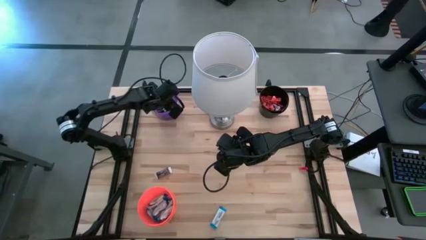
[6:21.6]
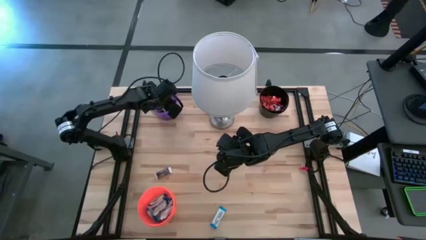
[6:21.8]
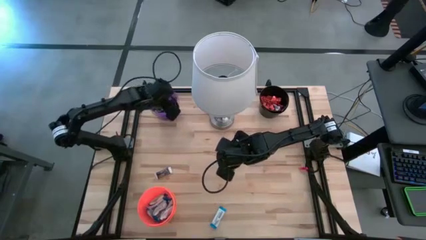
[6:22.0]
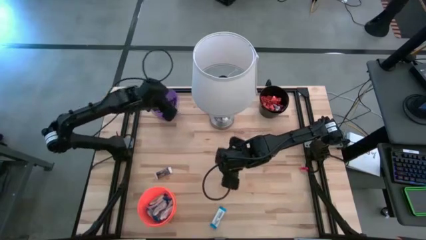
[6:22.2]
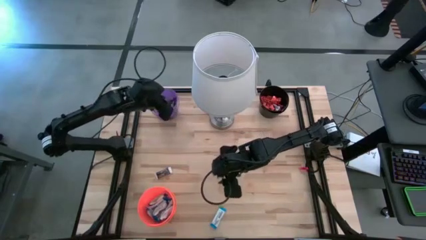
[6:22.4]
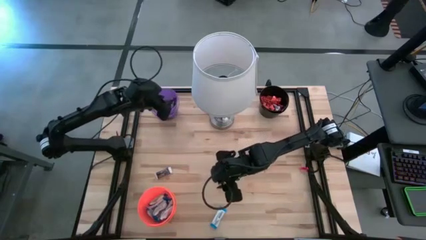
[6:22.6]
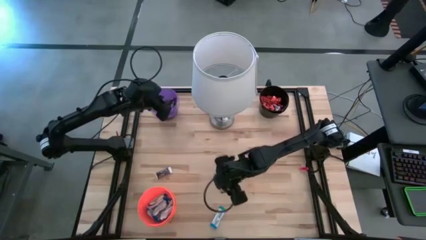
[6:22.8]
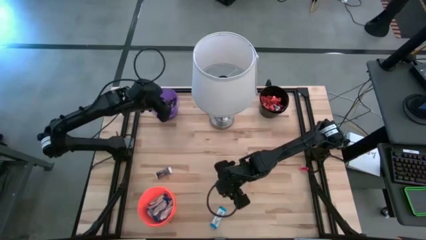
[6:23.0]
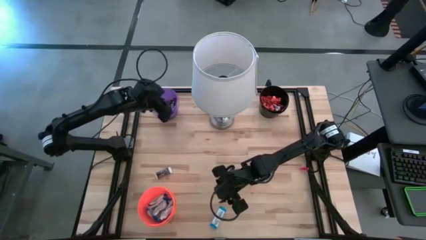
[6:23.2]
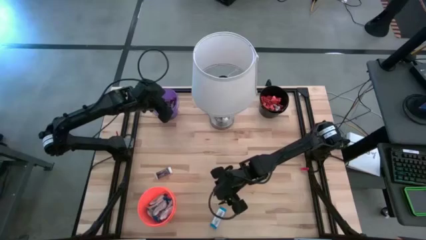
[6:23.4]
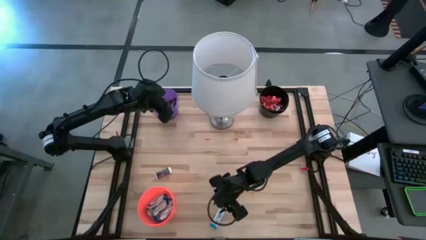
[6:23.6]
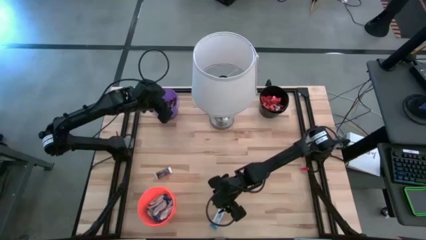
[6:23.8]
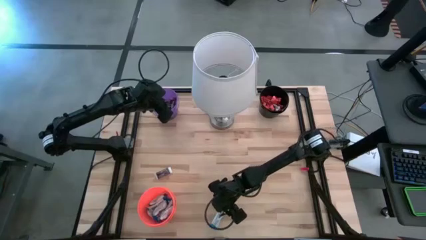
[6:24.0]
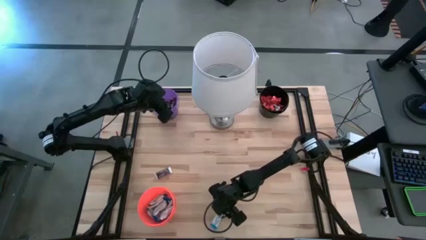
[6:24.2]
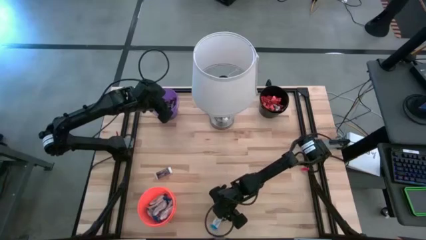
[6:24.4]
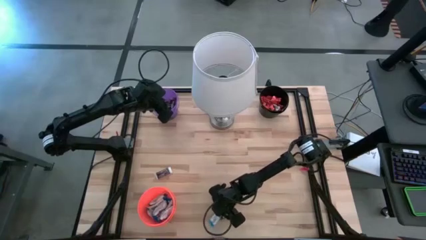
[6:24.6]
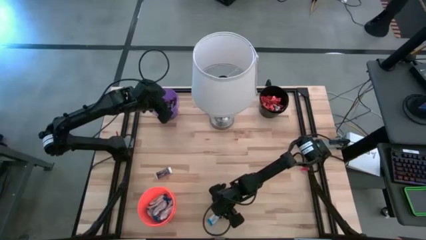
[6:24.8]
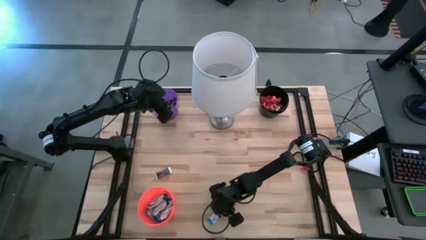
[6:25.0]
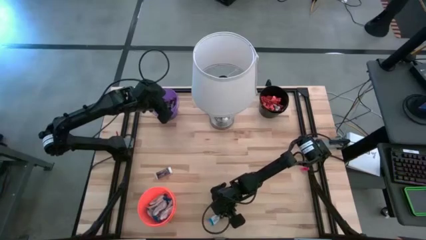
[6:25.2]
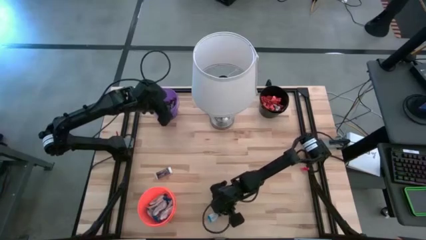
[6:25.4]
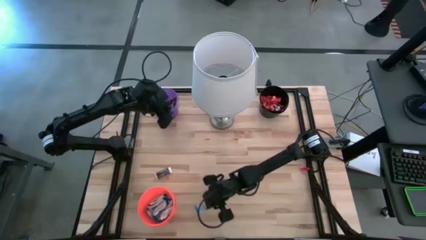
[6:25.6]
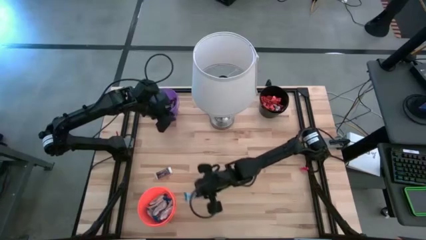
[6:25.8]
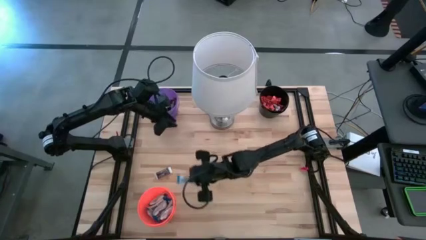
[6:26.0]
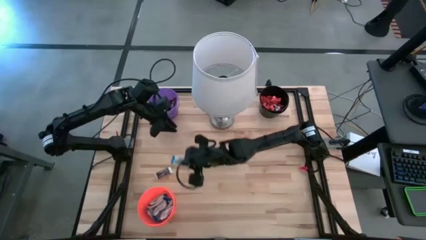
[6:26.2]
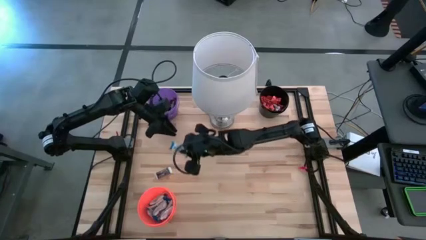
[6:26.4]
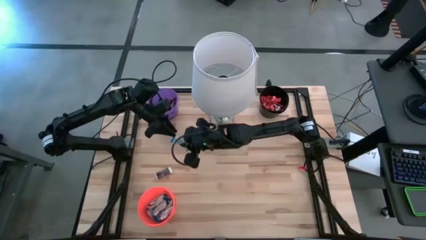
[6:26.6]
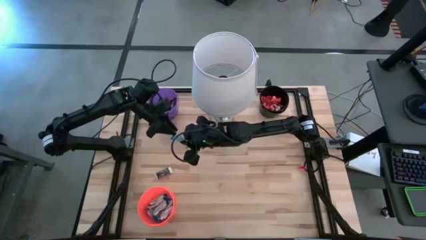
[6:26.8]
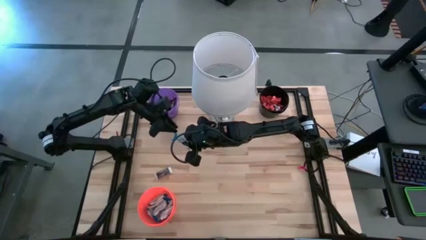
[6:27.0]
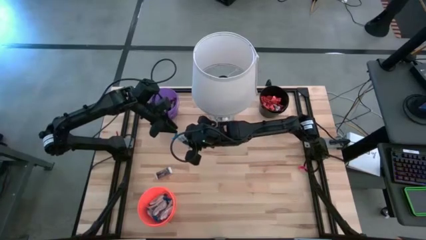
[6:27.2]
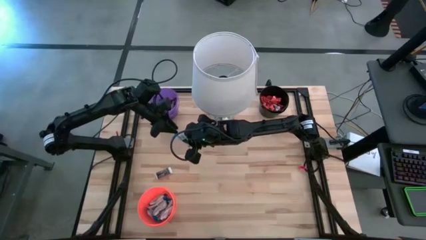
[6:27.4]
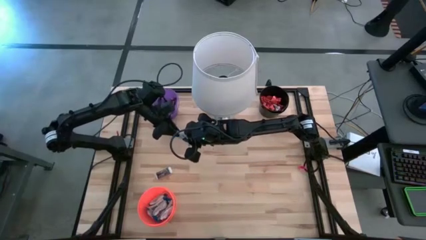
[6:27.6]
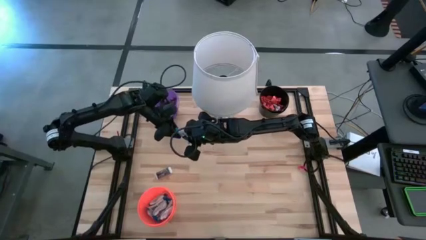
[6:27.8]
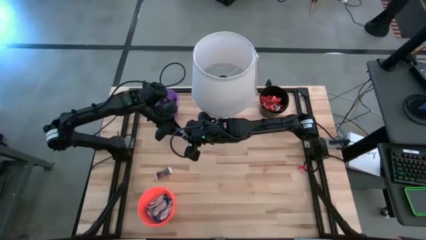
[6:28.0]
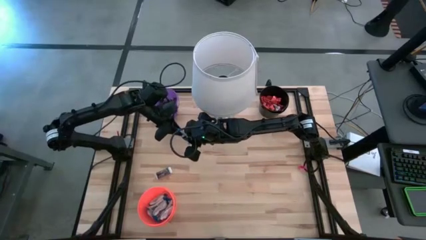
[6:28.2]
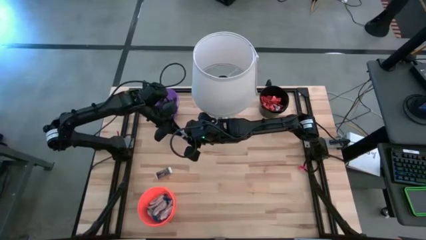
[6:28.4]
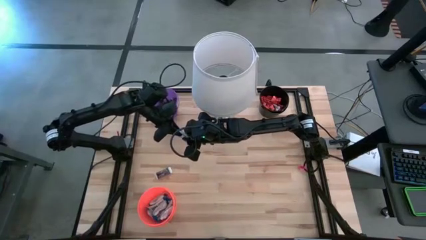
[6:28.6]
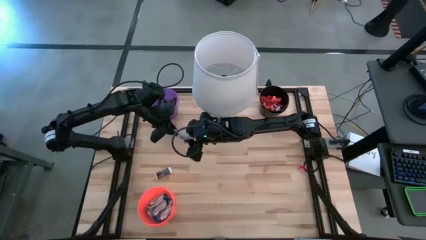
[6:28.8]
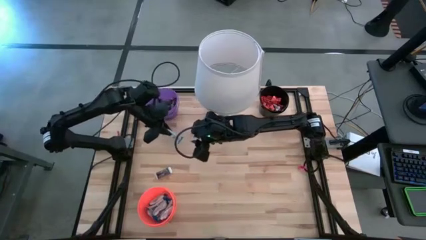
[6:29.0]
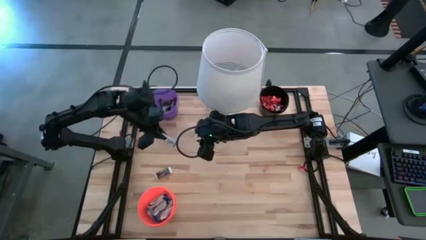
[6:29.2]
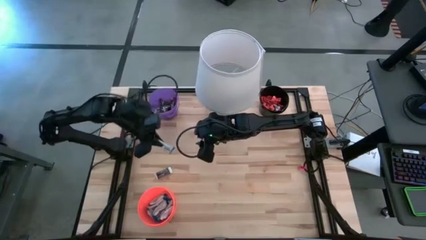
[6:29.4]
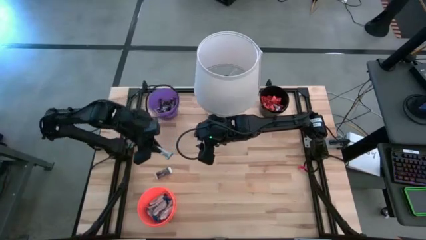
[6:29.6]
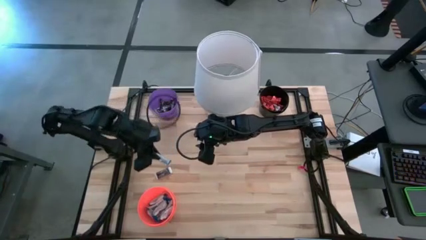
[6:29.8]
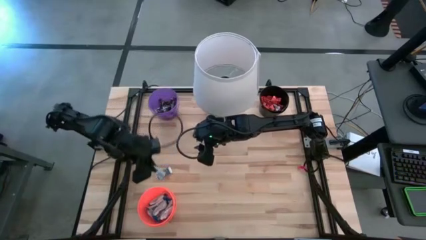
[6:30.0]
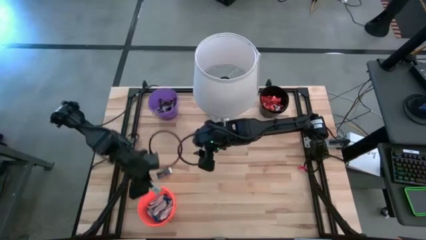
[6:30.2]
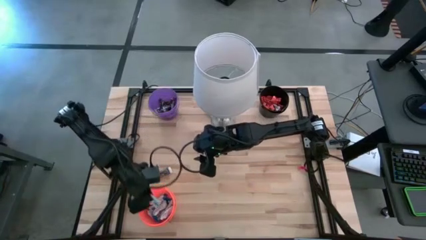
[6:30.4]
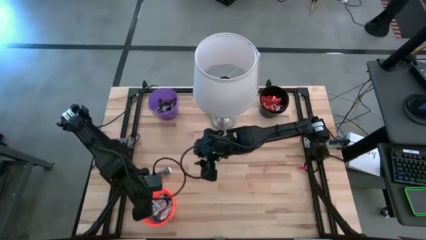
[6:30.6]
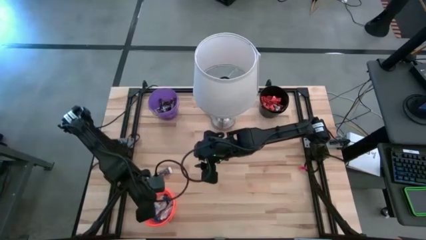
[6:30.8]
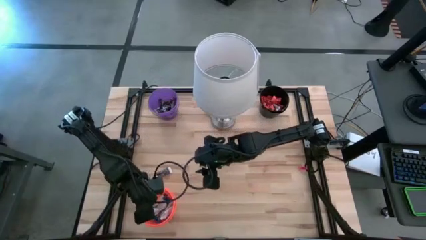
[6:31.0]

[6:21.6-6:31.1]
Task: Organize candy in baskets
Put the white chocolate bar into the orange bucket

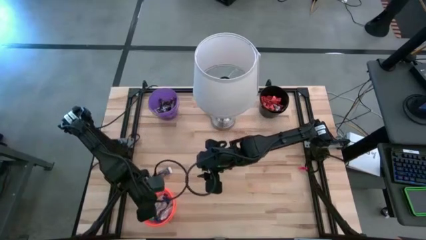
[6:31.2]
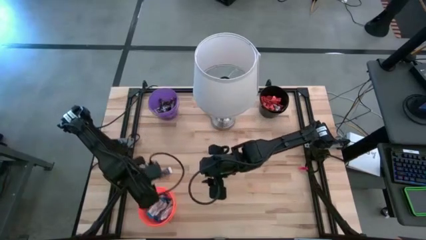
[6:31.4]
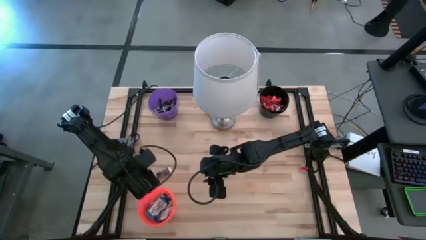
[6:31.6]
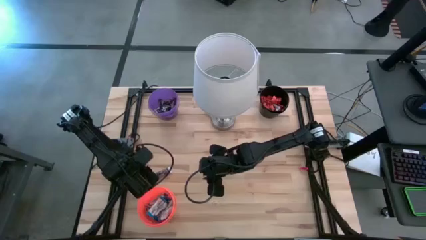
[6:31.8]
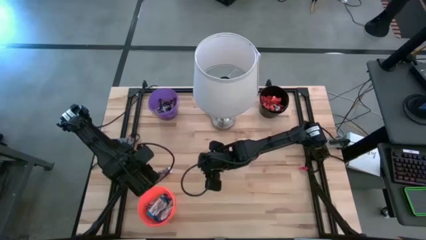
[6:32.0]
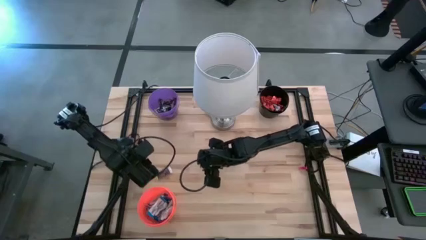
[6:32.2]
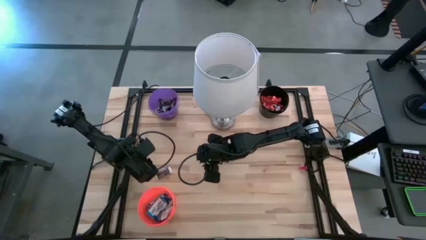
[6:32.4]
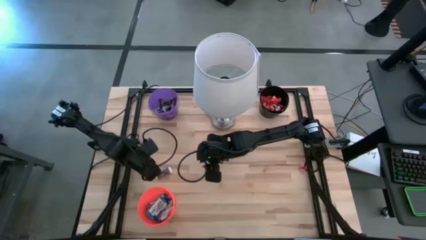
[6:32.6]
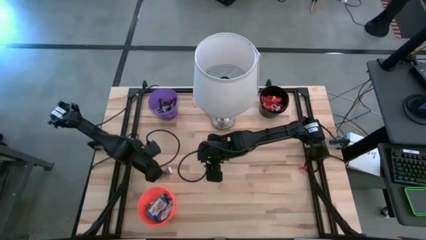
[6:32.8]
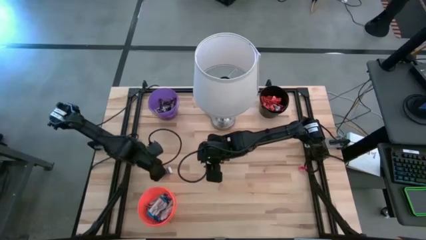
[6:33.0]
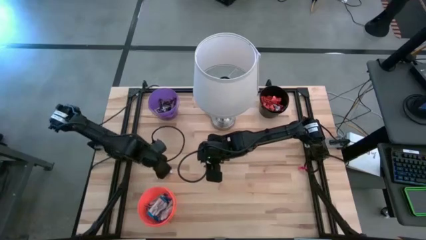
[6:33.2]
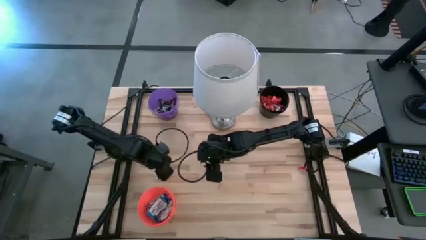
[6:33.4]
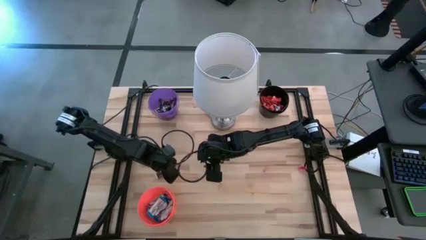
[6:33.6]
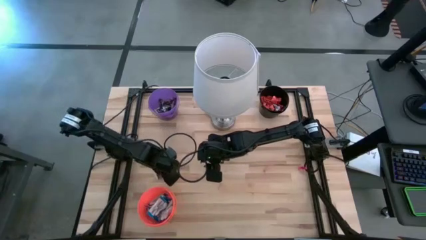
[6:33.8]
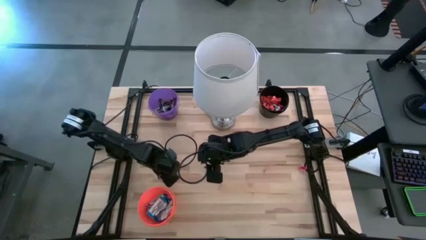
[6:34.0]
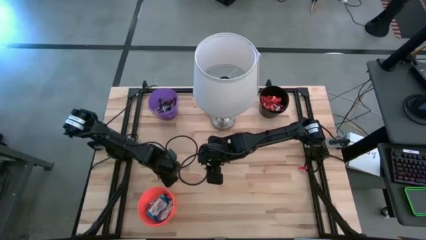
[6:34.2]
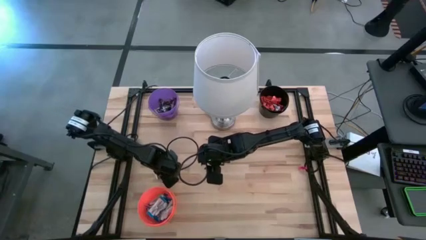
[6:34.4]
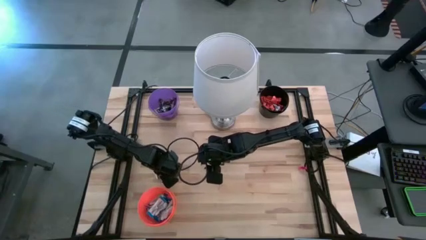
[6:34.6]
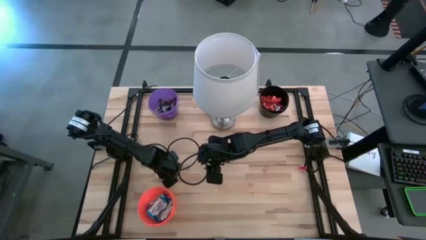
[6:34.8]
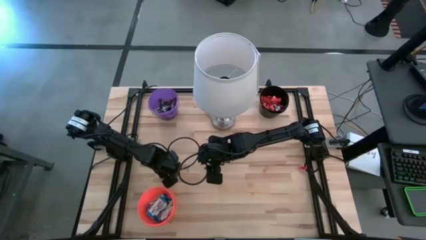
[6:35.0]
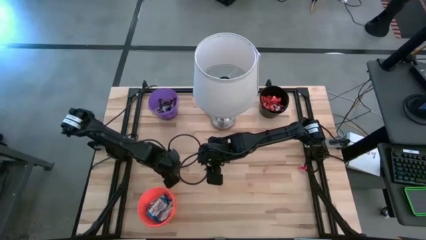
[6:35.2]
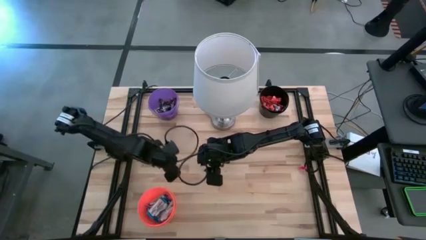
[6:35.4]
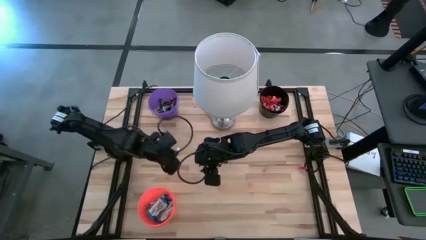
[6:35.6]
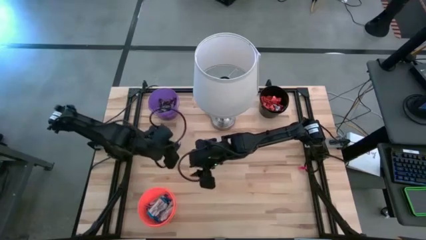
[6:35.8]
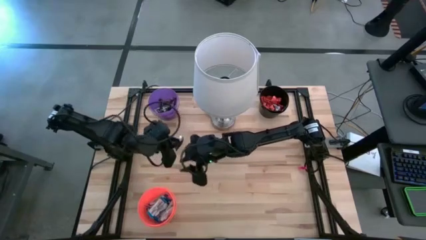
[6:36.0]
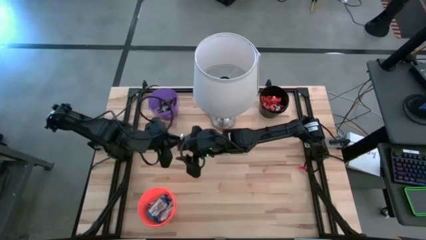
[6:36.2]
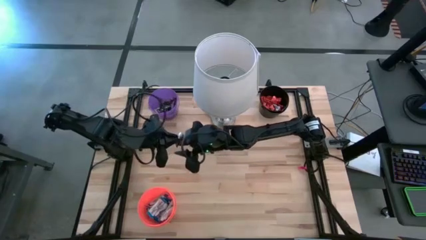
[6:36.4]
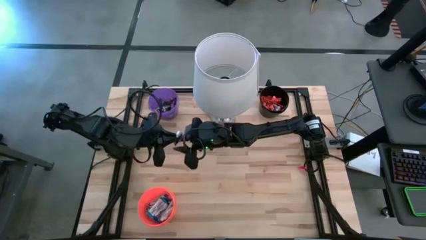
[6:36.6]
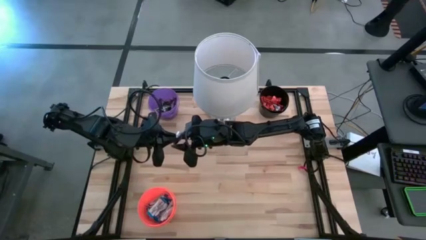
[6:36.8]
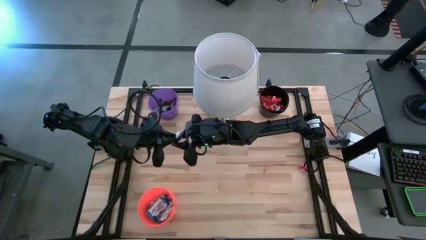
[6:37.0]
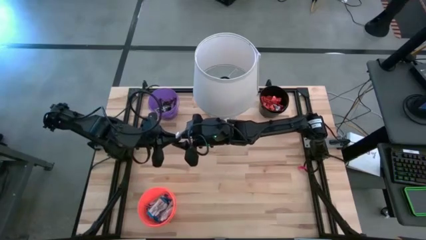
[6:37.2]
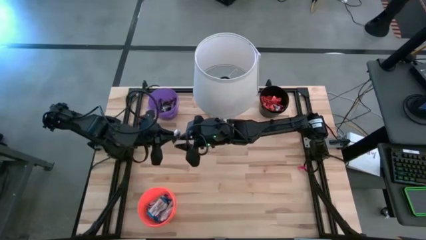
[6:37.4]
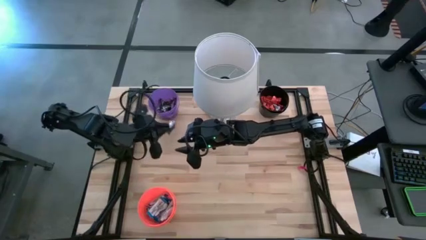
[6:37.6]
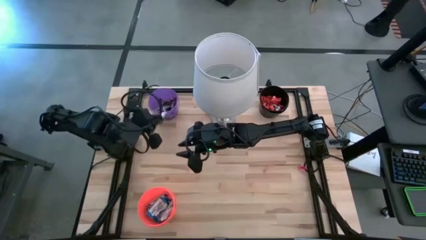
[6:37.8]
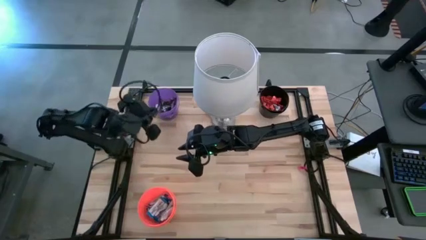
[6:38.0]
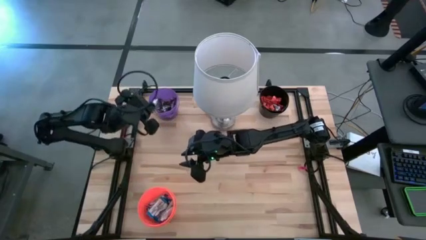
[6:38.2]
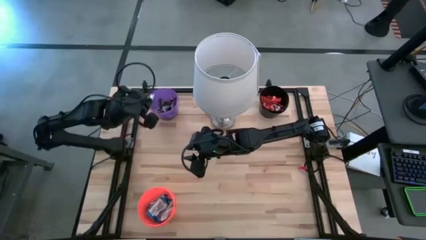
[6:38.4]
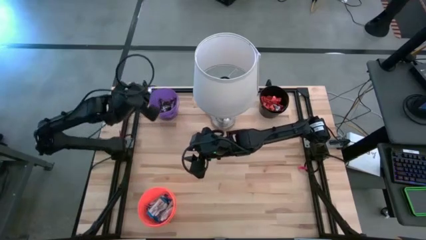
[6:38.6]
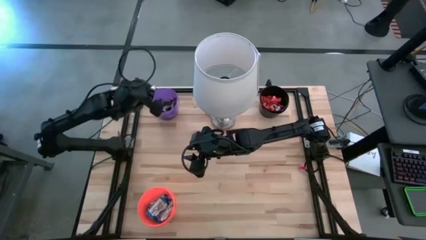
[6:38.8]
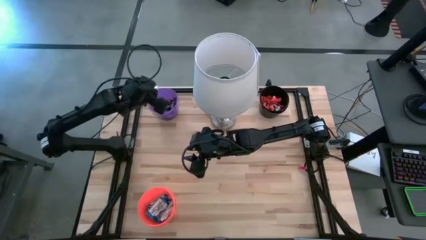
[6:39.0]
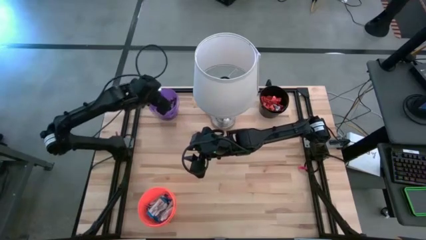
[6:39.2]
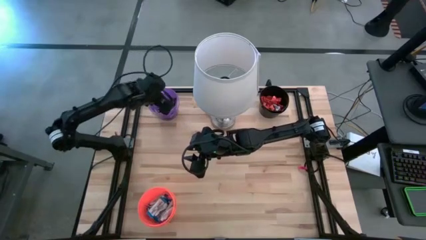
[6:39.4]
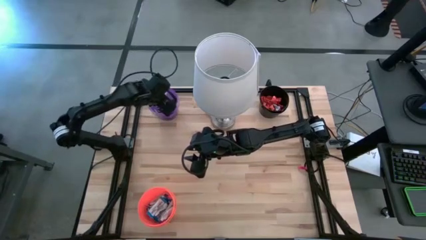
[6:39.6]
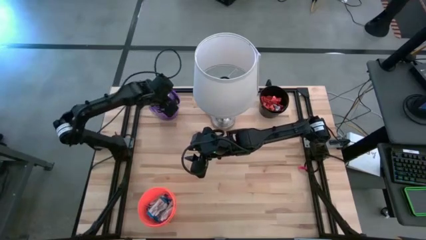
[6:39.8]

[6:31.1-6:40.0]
Put the brown chocolate bar into the purple bucket
